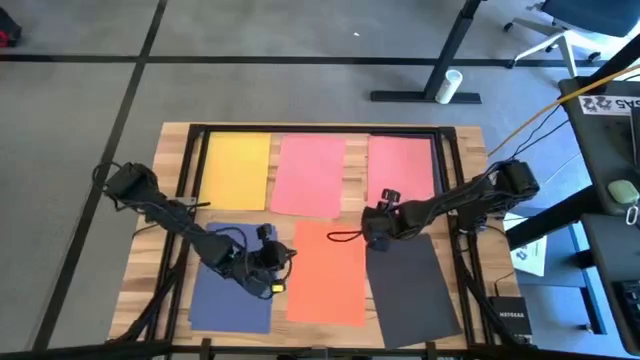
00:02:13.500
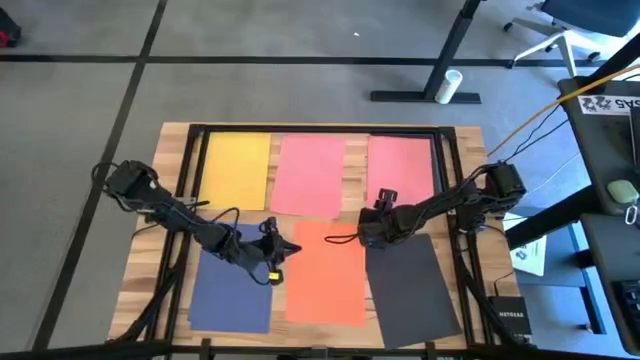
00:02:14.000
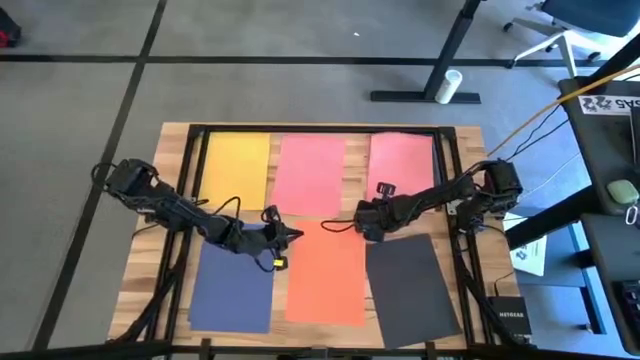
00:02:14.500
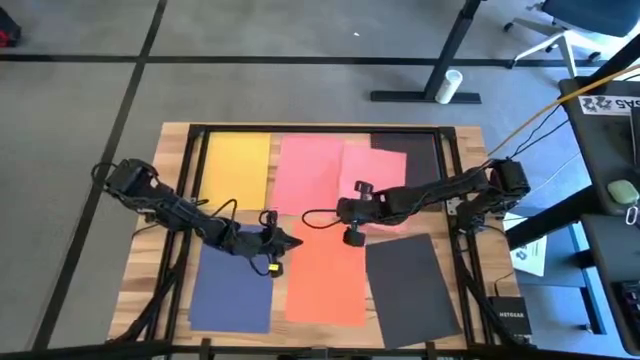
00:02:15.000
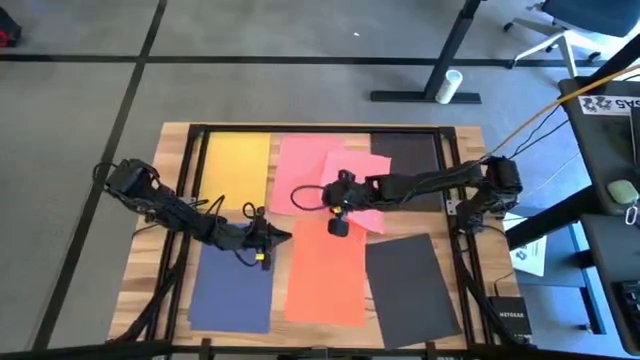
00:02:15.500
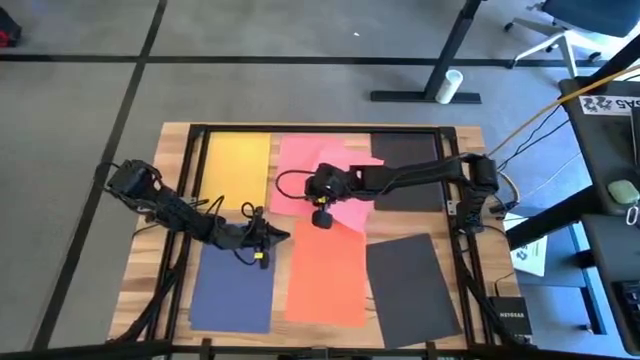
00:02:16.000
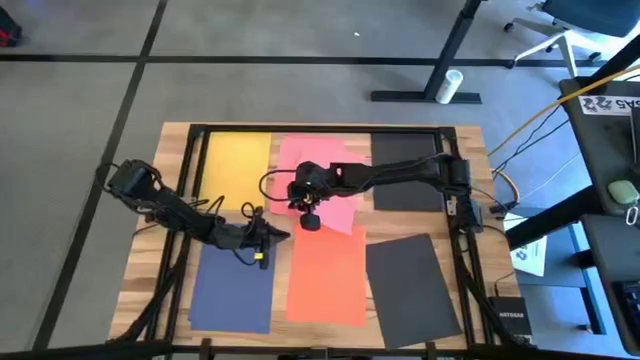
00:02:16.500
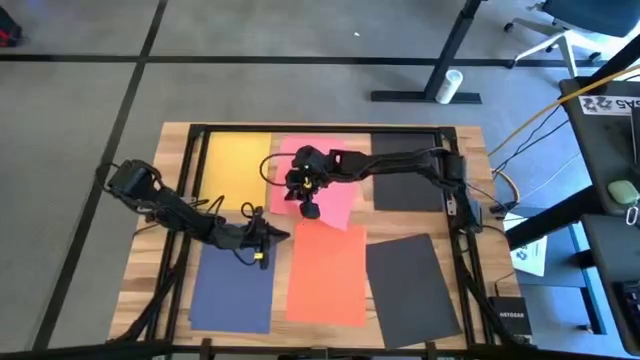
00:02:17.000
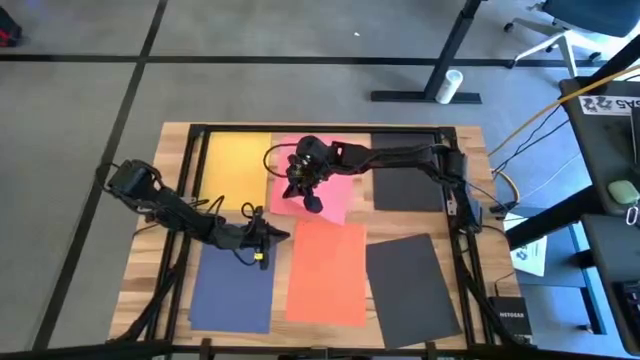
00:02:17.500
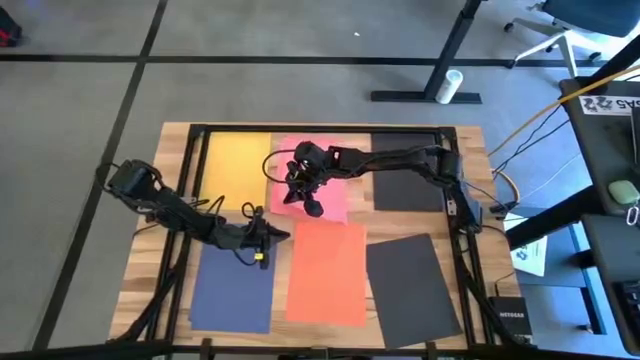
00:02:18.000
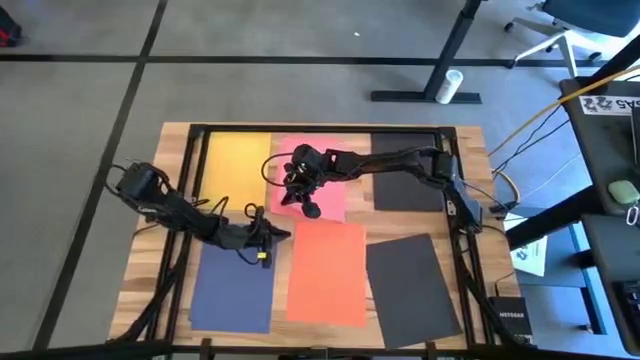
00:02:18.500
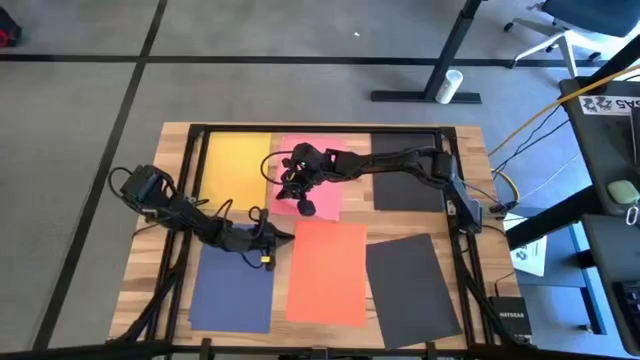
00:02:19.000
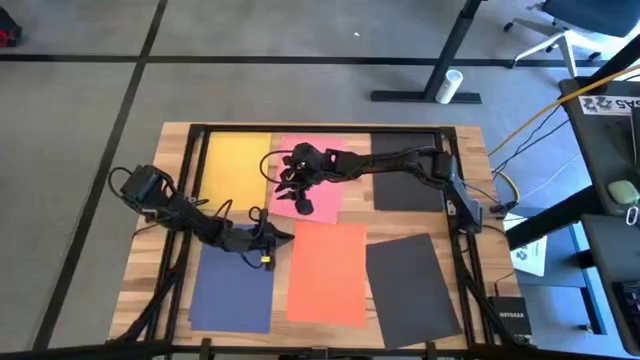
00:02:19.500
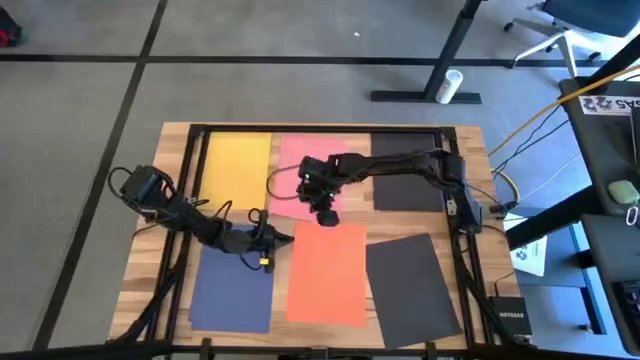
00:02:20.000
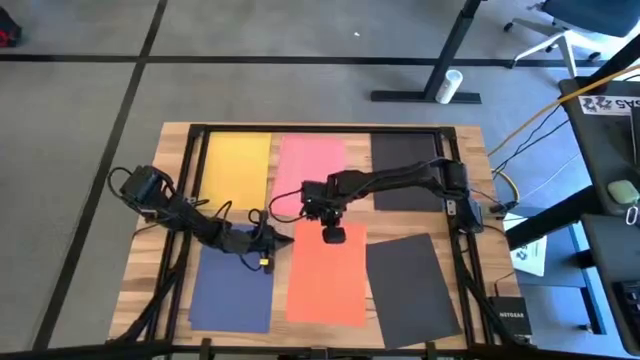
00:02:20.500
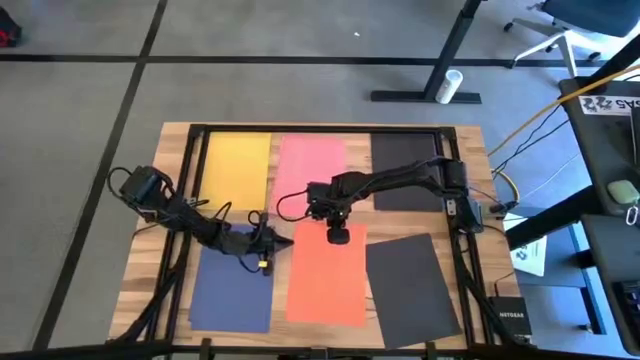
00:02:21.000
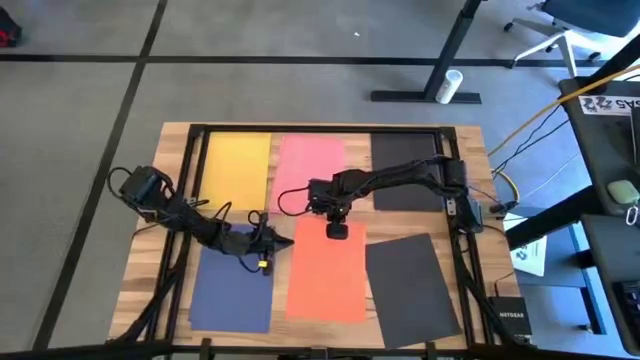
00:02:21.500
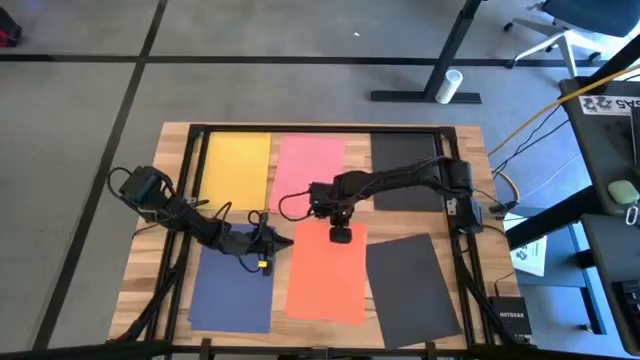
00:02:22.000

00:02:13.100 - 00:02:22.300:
Task: Organize paper
Stack the pink paper on top of the stacked pink papers

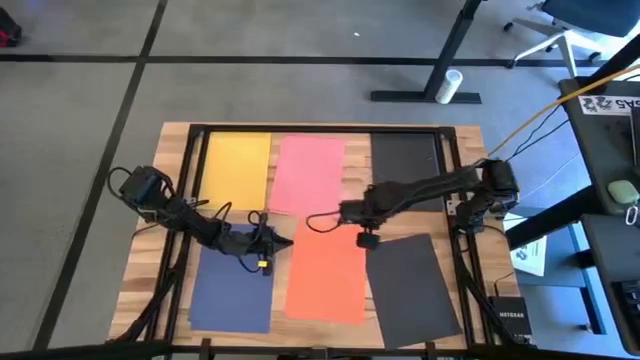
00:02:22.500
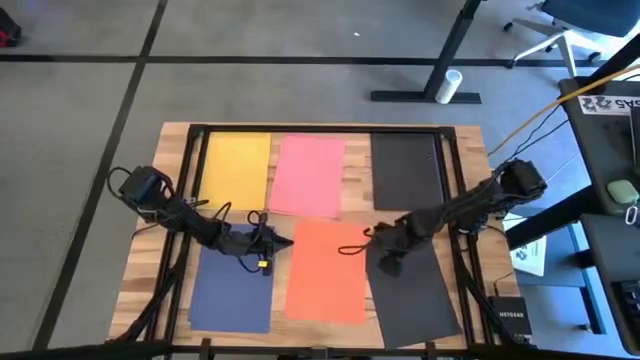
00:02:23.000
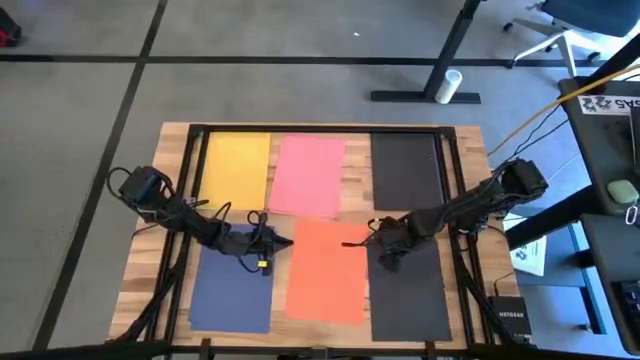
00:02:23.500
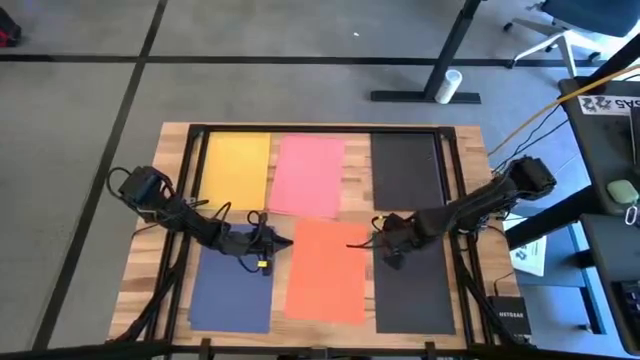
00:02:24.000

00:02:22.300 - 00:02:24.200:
Adjust the black paper on the table

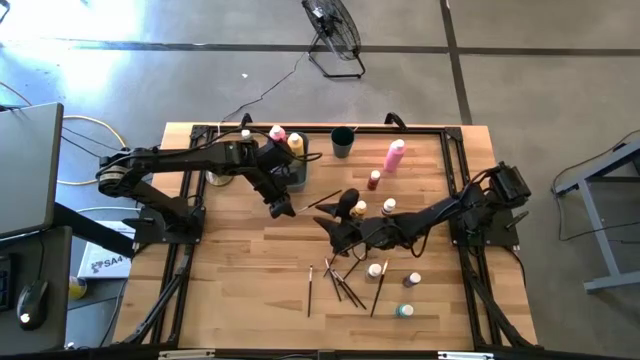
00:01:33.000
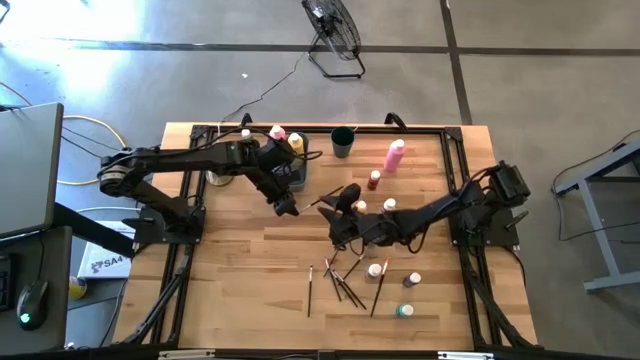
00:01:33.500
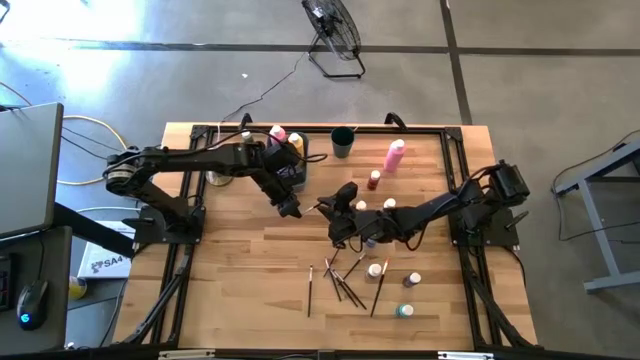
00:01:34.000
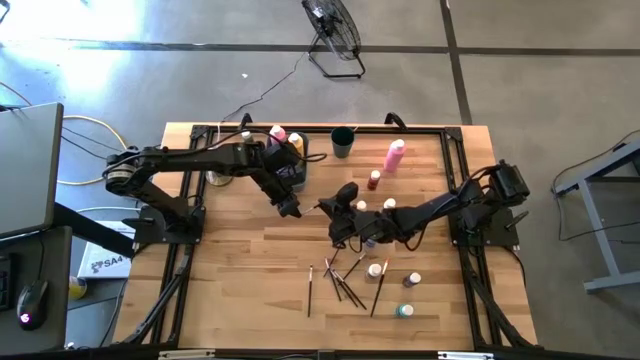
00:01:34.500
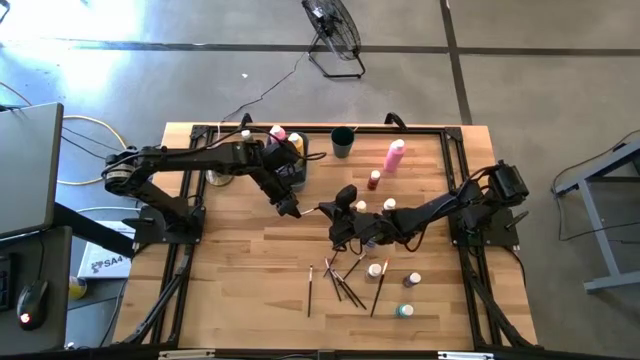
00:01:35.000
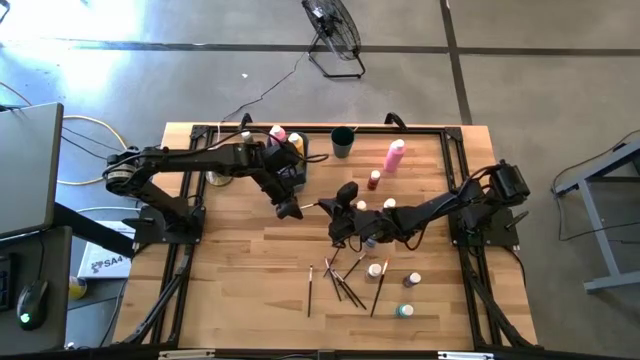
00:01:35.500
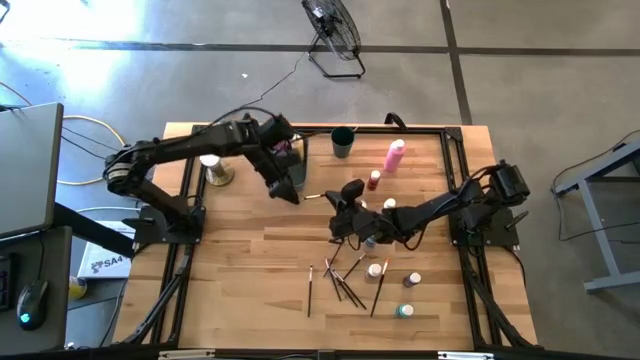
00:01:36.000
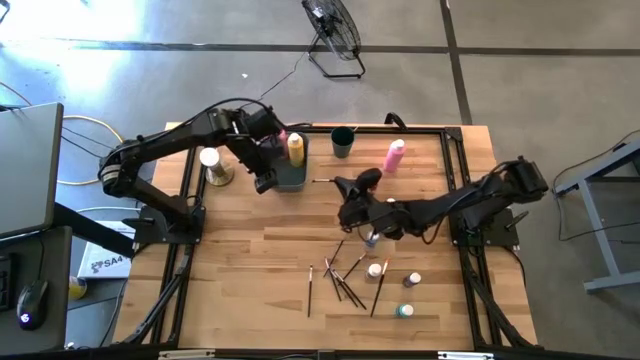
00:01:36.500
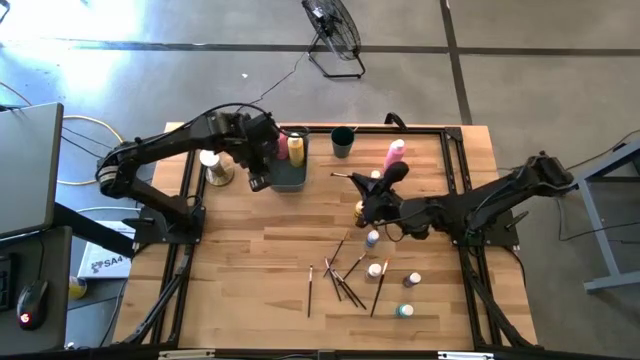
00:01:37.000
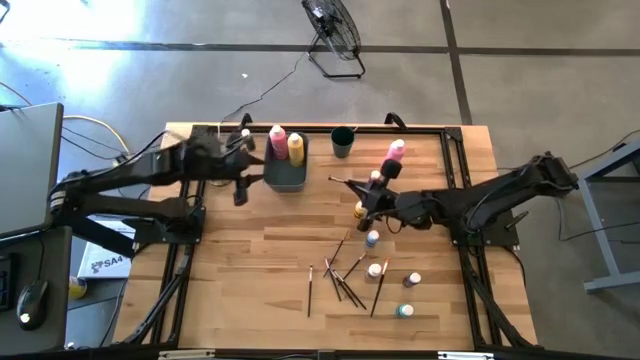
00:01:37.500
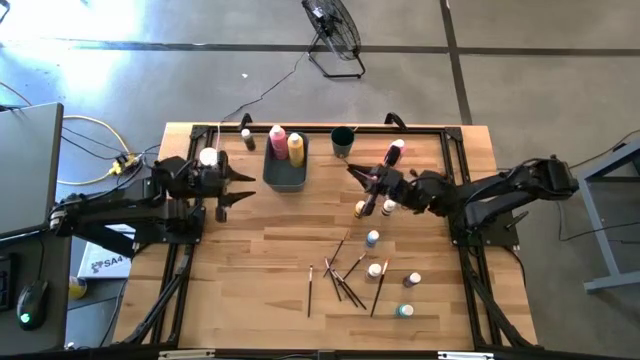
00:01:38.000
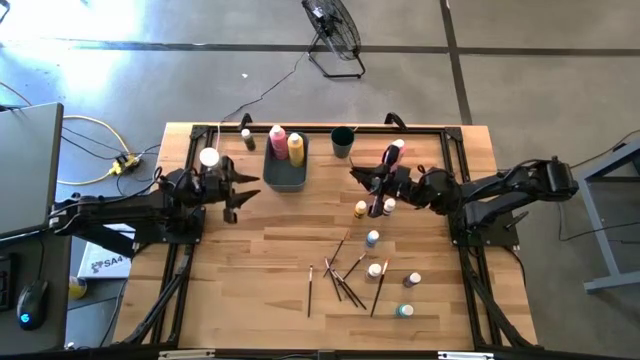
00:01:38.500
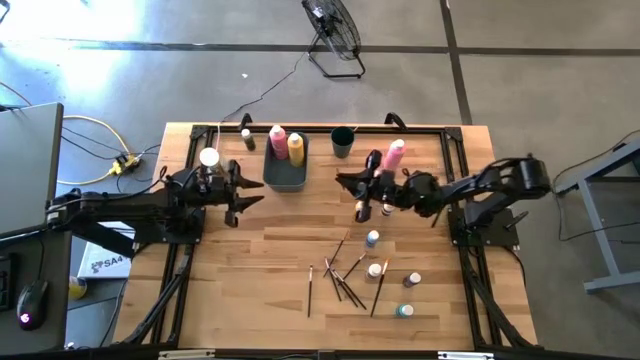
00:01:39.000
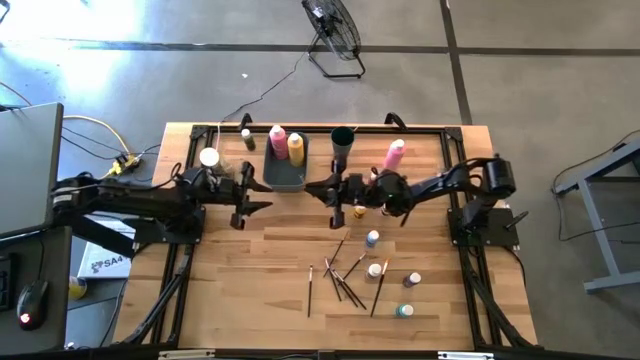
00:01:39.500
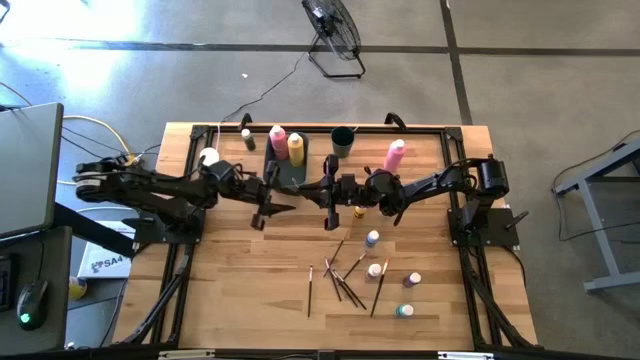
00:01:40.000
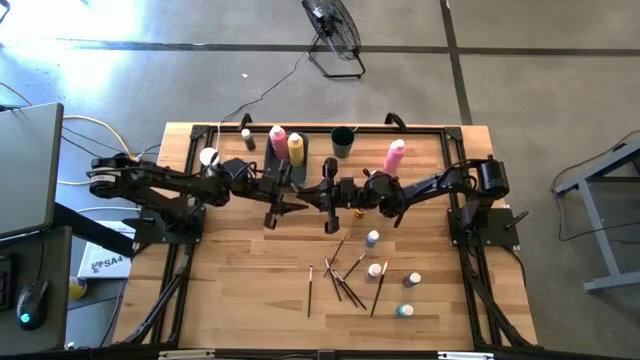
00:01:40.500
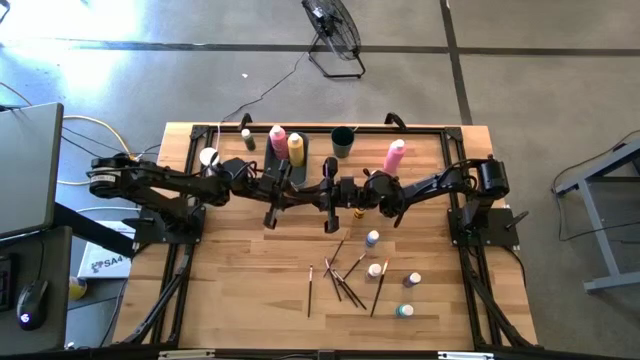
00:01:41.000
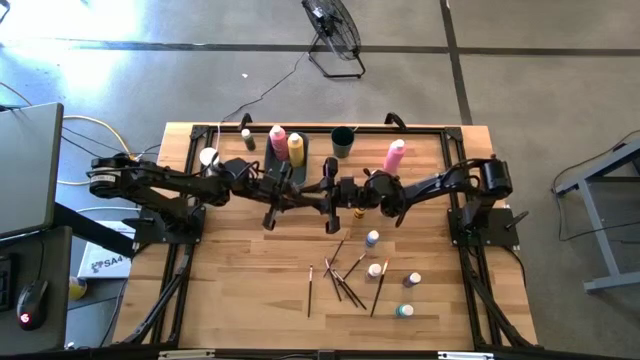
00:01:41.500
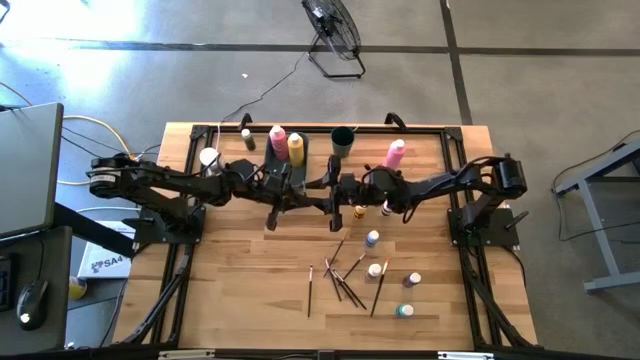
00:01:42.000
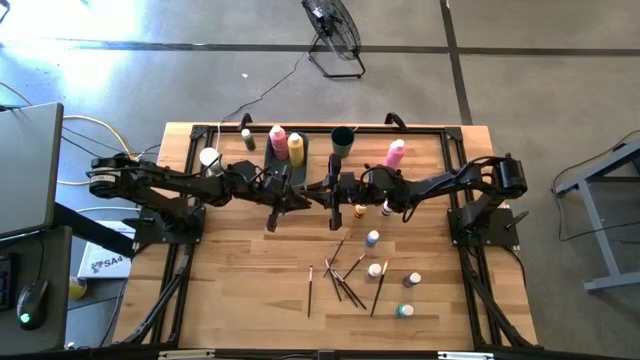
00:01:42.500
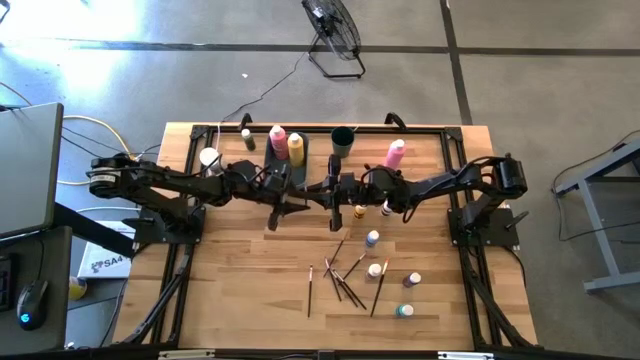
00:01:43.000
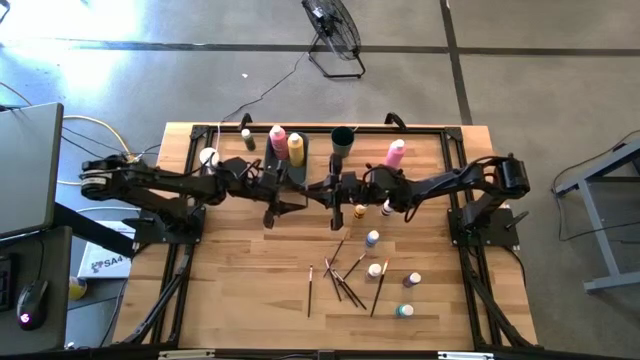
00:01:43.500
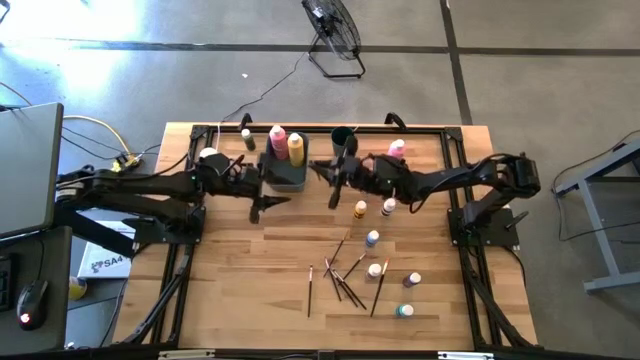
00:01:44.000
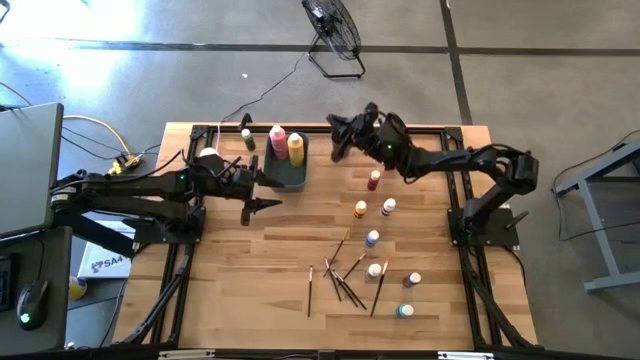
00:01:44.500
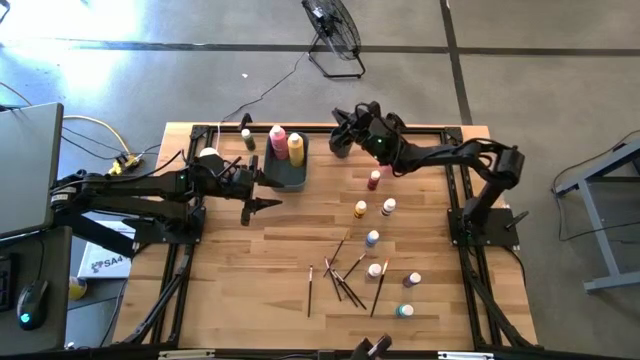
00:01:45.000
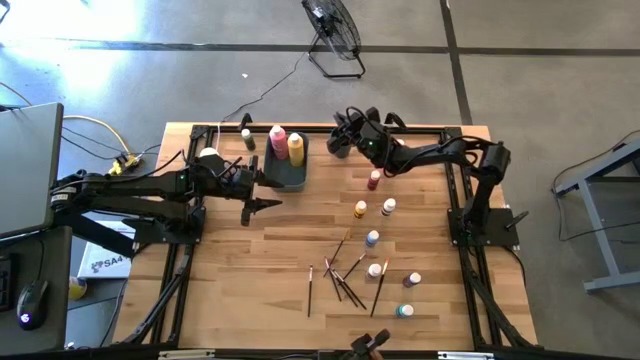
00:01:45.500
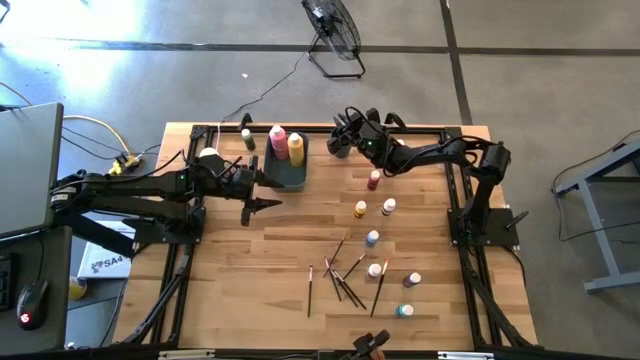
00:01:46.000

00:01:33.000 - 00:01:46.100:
Task: Pick & Place Paint Supplies
Put the silver paint brush into the green cup
